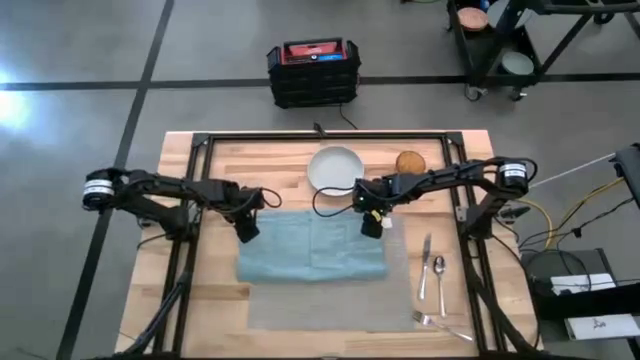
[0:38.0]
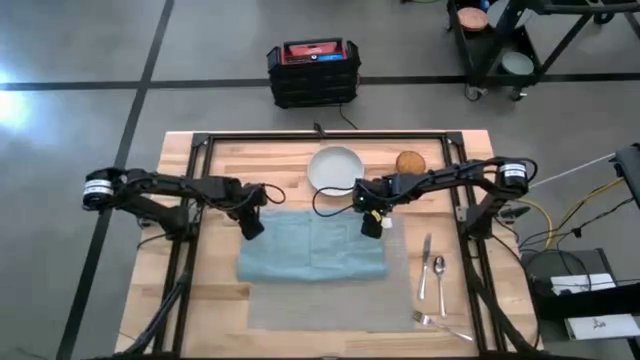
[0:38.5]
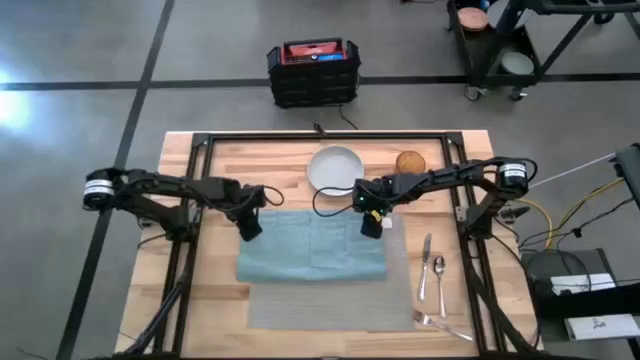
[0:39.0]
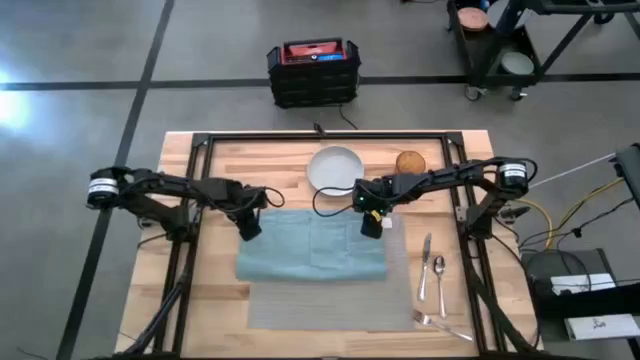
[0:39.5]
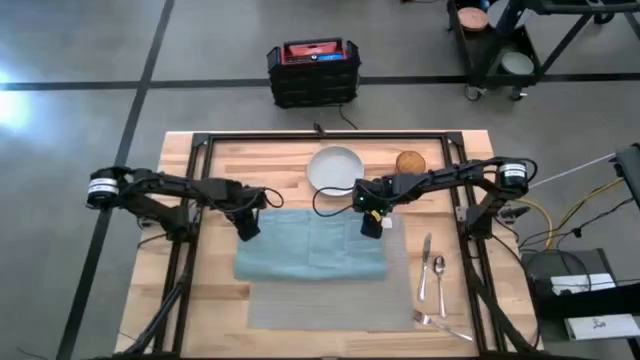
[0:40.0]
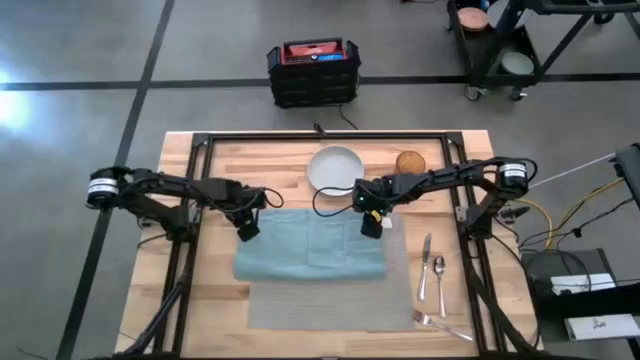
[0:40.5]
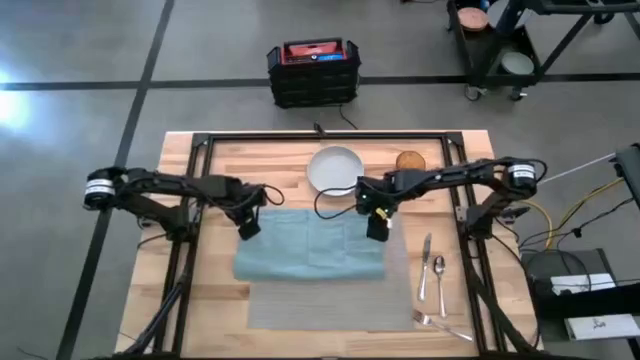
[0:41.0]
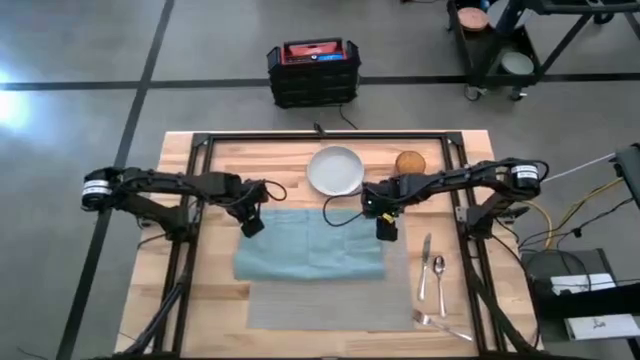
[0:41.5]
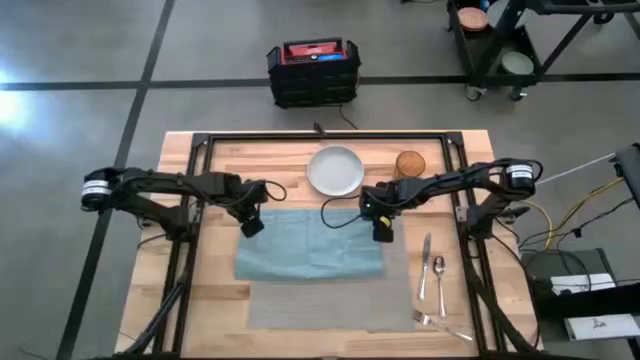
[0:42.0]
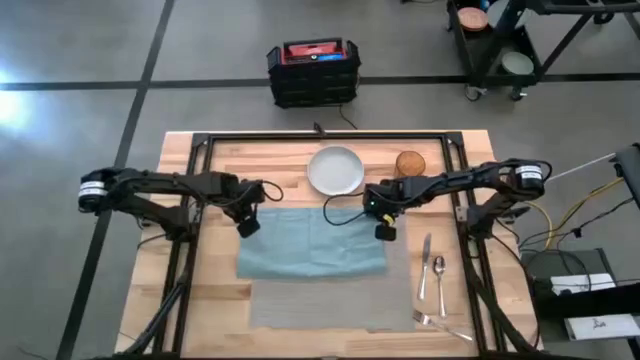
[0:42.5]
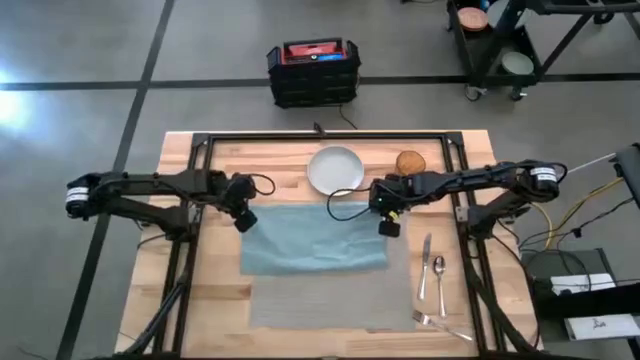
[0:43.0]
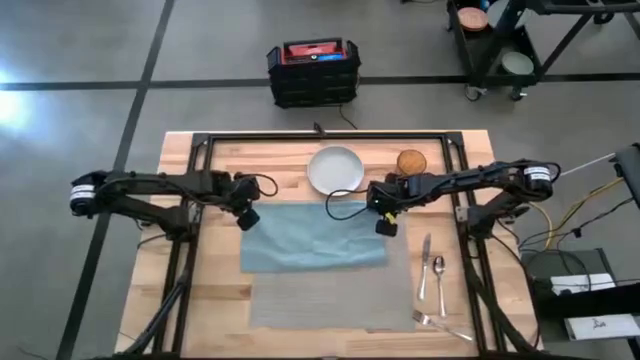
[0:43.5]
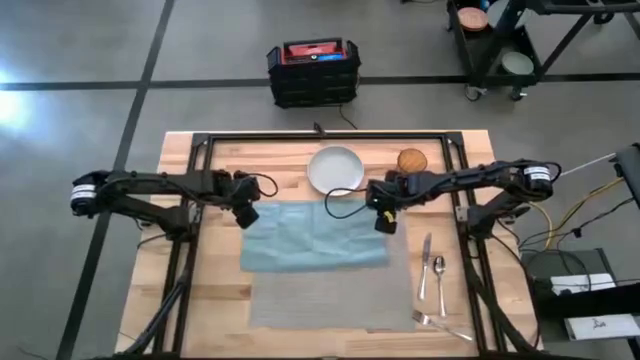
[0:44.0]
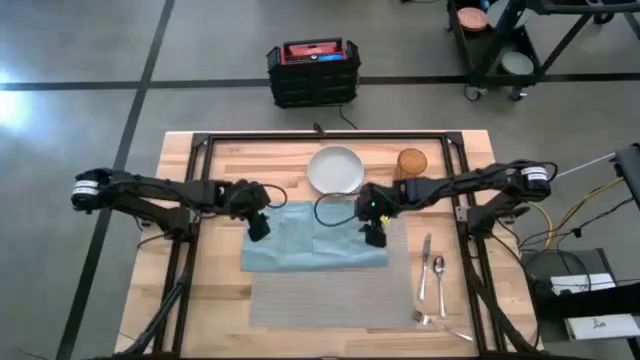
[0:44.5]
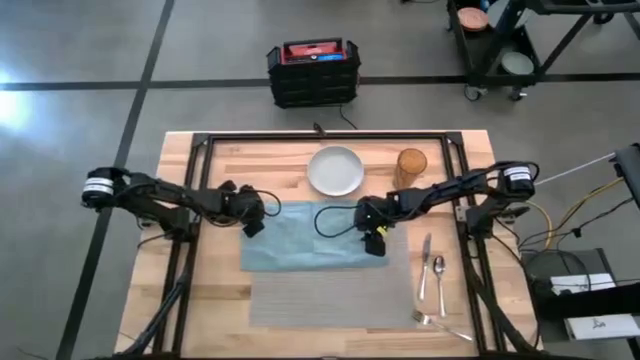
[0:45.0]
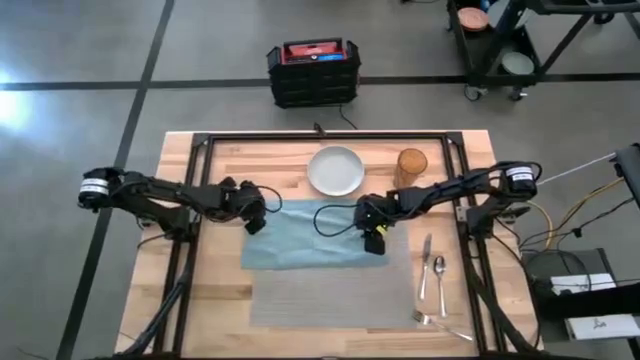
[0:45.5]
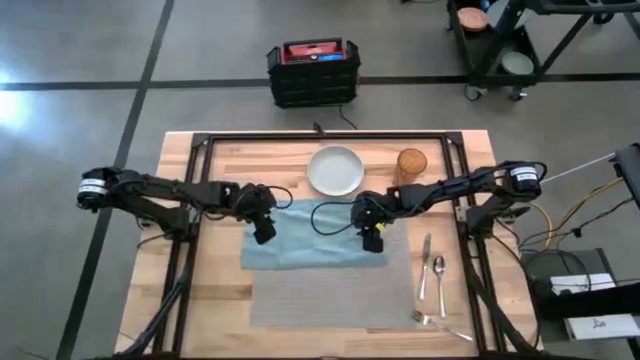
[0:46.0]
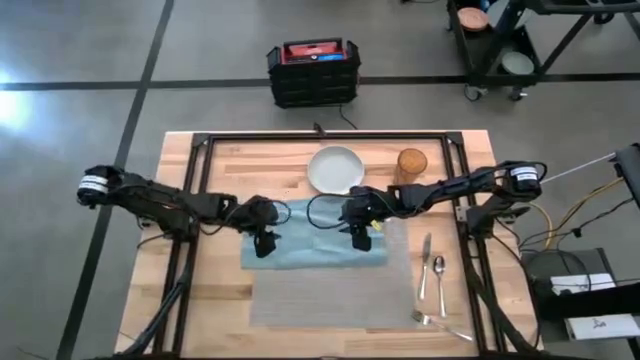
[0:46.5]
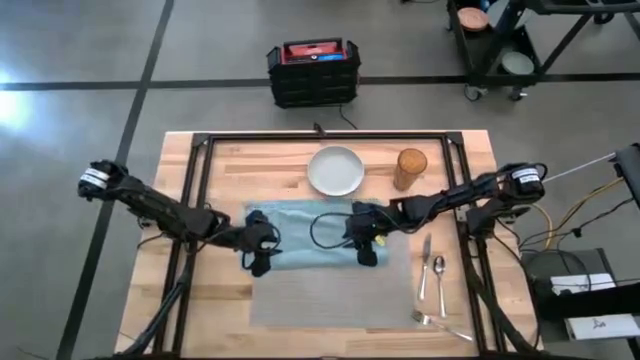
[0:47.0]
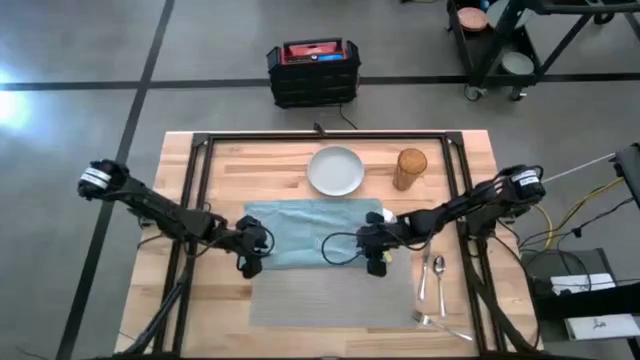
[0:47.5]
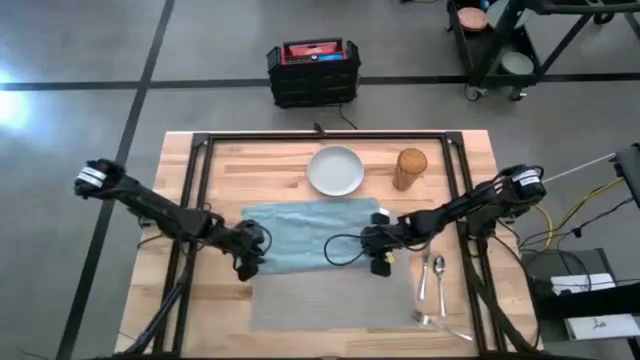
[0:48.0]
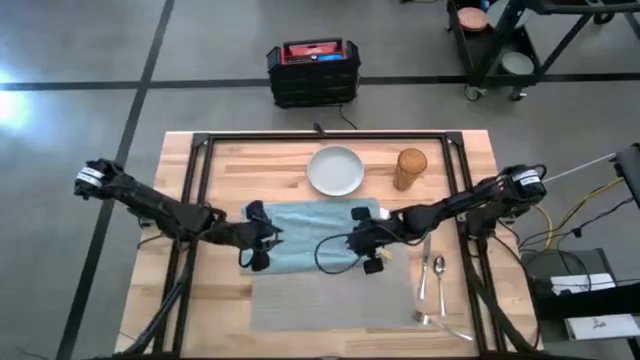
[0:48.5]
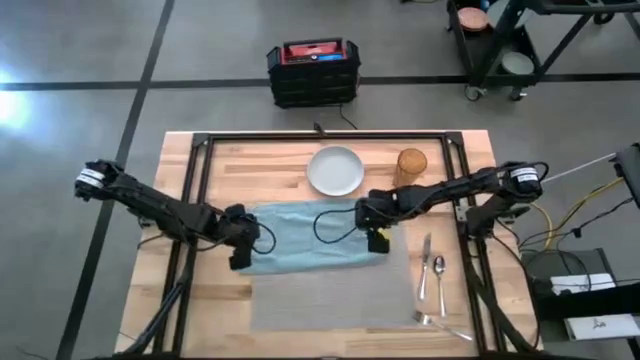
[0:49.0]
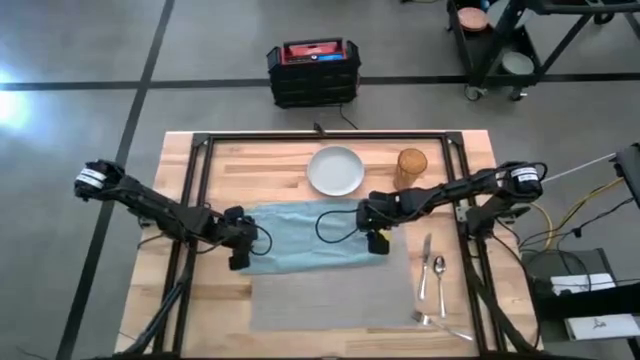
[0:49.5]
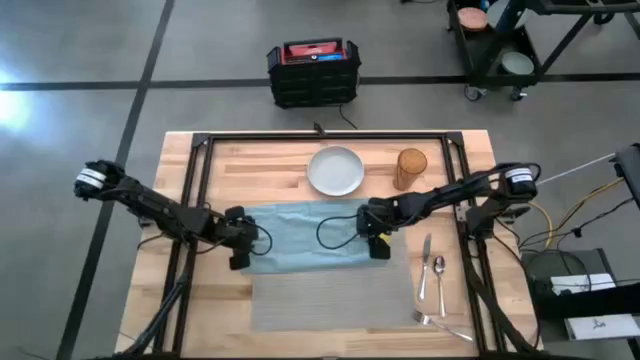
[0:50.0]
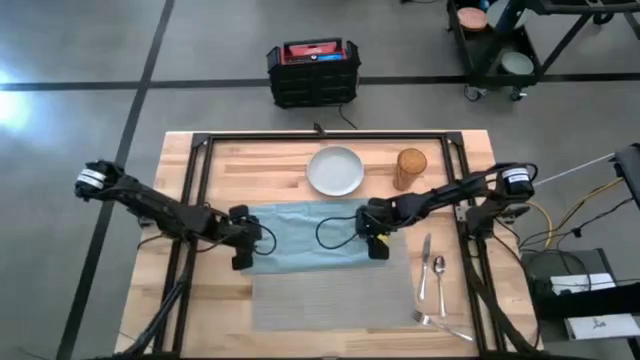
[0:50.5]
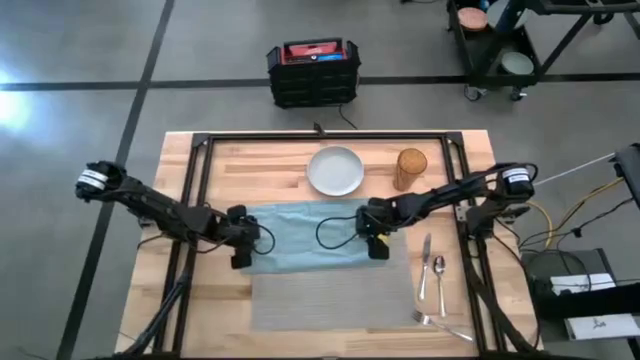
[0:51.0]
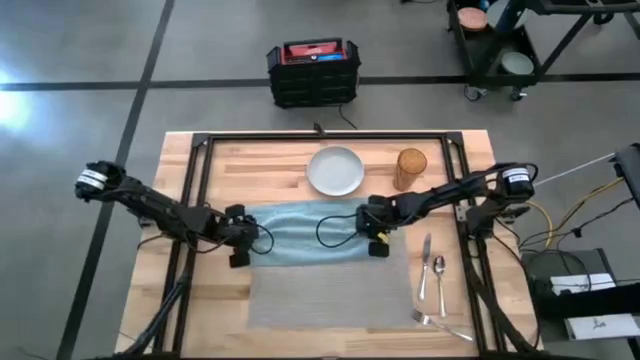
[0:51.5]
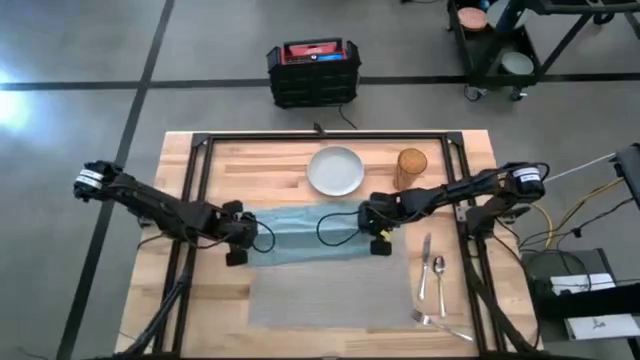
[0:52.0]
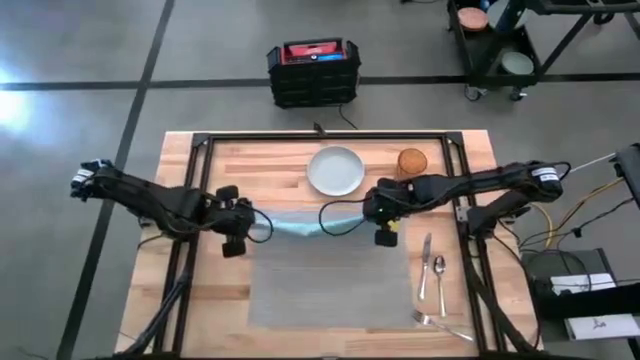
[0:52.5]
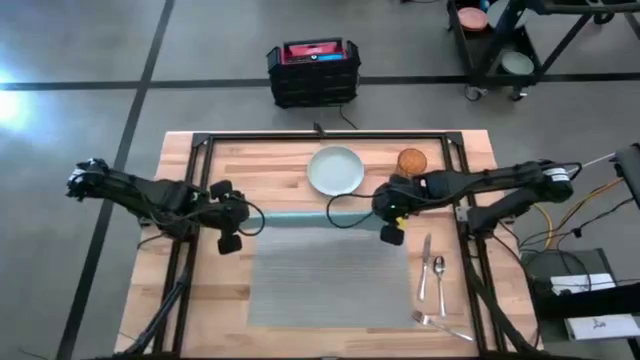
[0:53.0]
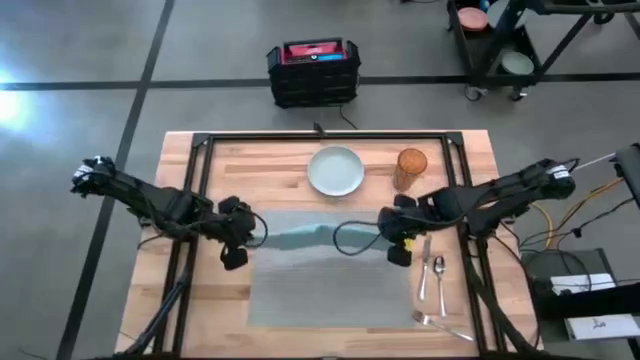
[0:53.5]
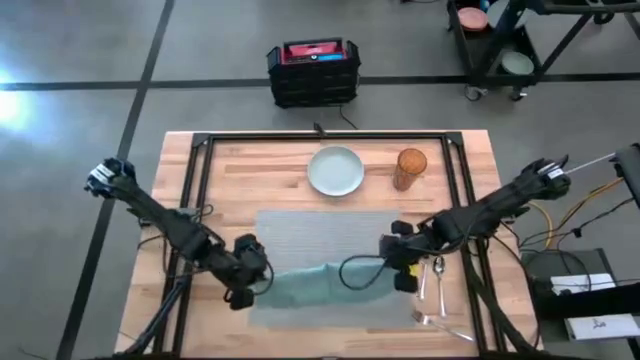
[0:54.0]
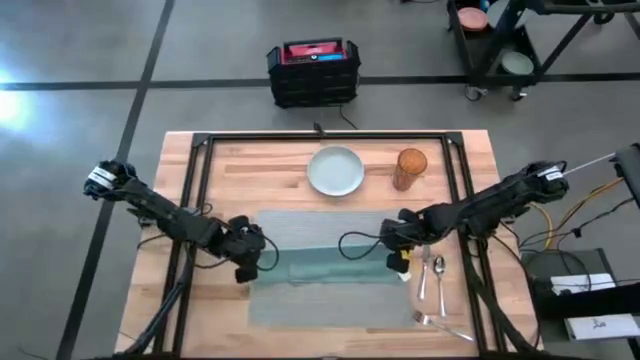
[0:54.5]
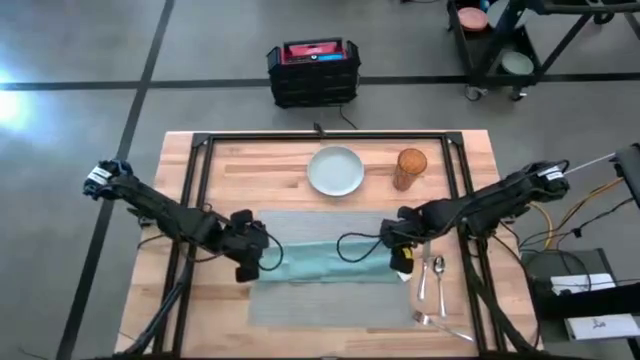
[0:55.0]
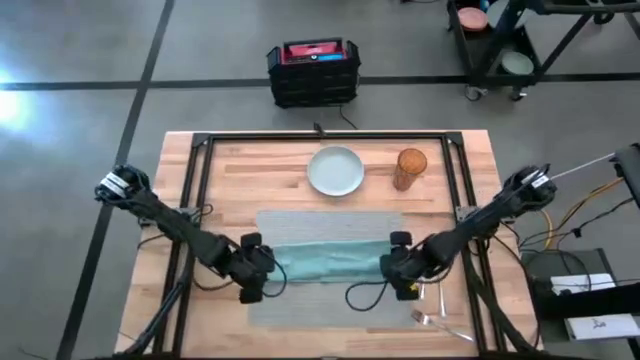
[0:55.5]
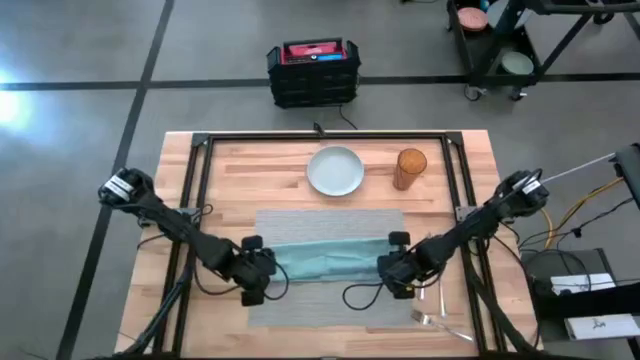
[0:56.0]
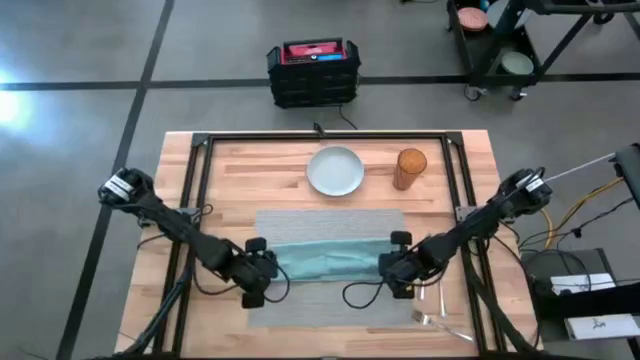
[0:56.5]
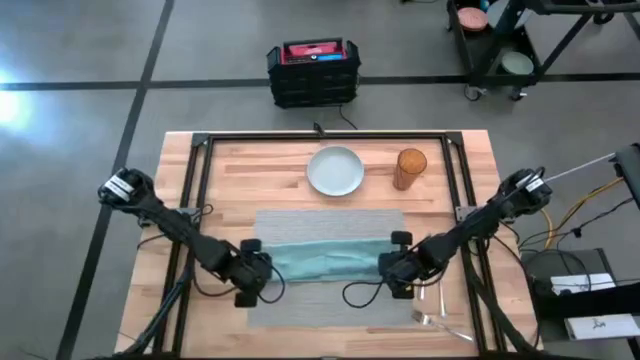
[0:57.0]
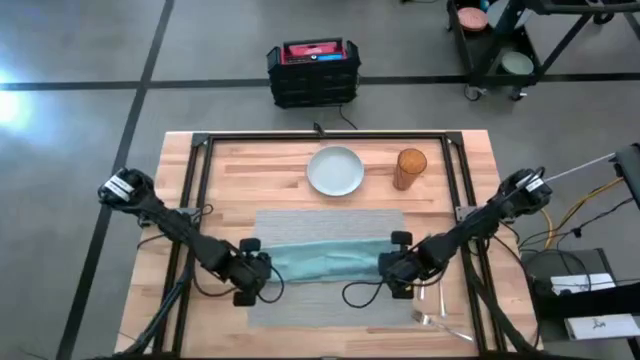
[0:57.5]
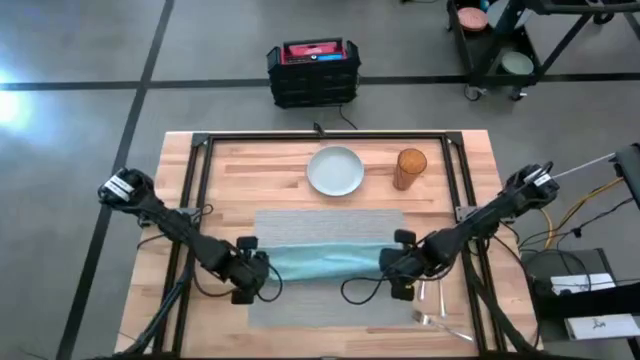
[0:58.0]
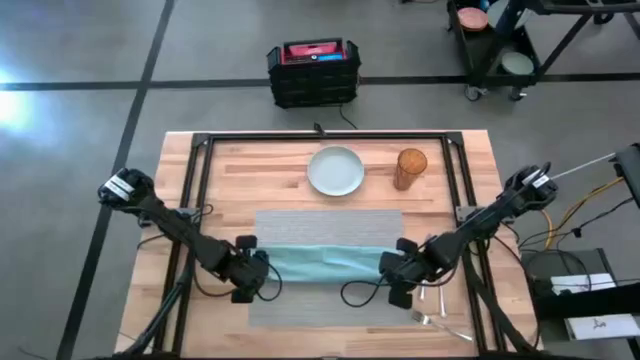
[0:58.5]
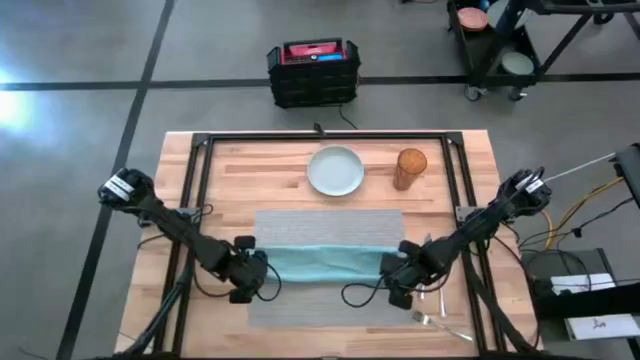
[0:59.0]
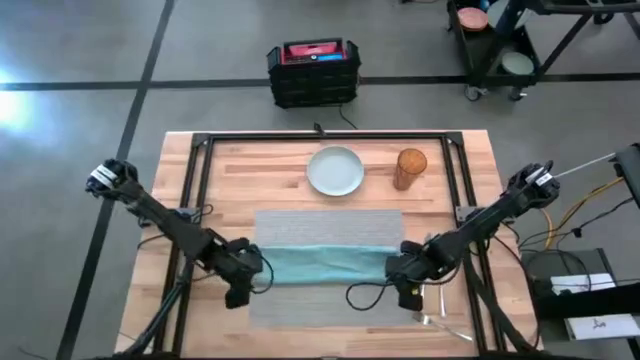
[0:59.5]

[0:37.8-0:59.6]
Task: Set table place
Fold the table napkin
